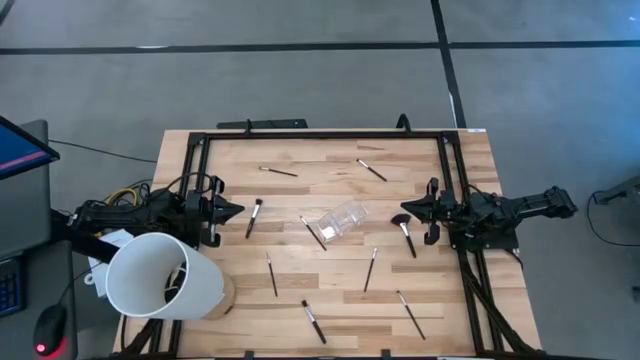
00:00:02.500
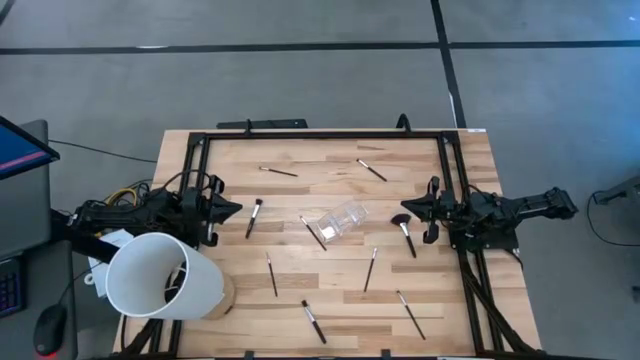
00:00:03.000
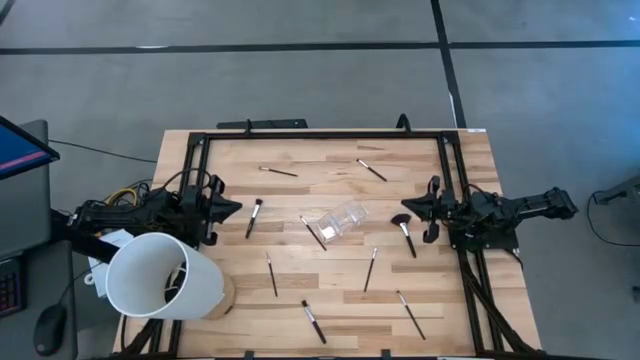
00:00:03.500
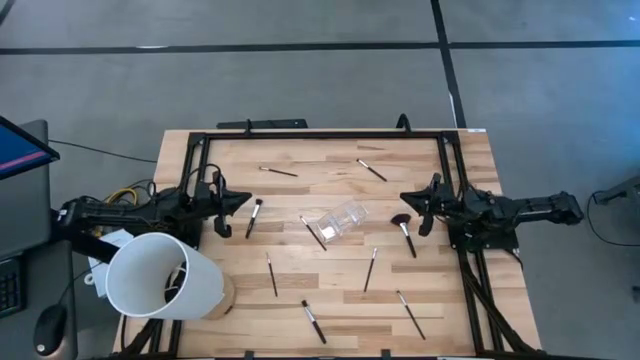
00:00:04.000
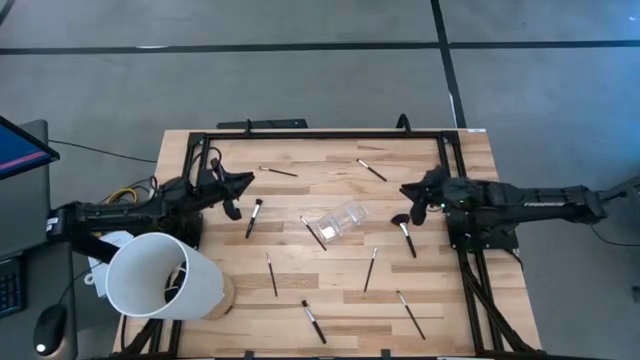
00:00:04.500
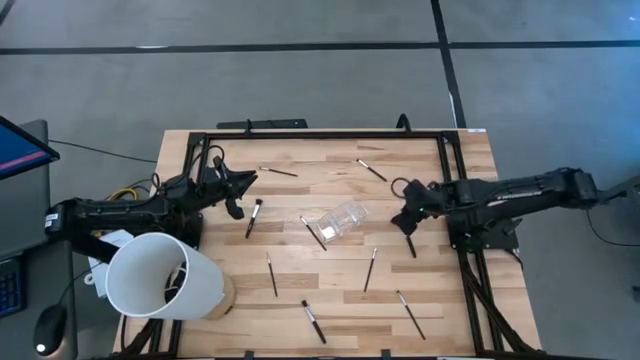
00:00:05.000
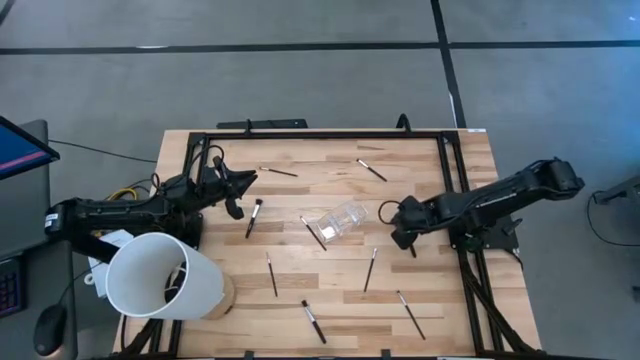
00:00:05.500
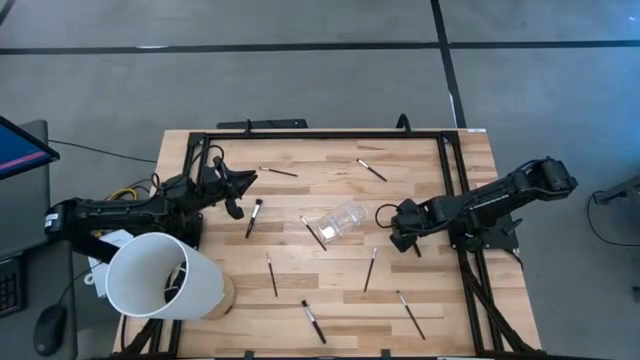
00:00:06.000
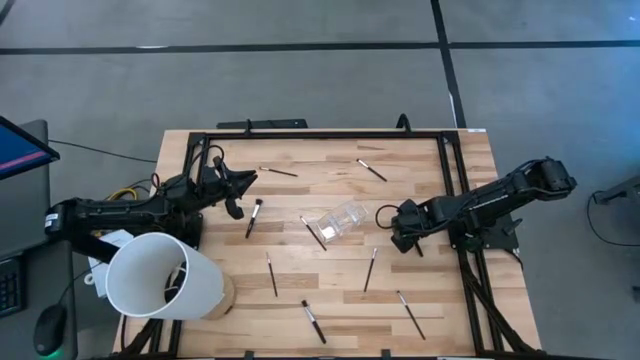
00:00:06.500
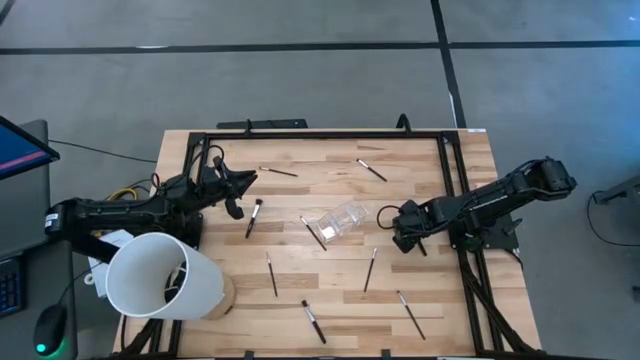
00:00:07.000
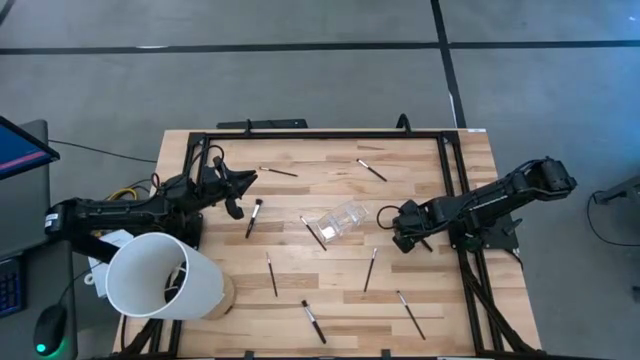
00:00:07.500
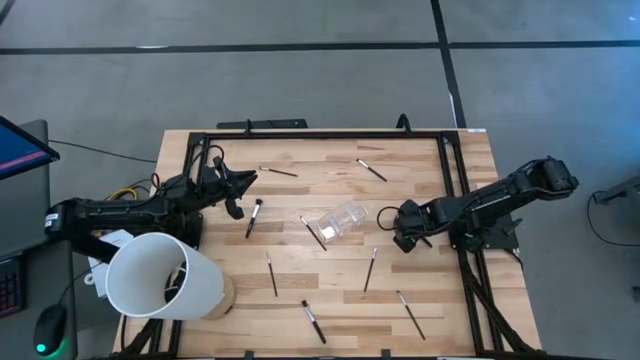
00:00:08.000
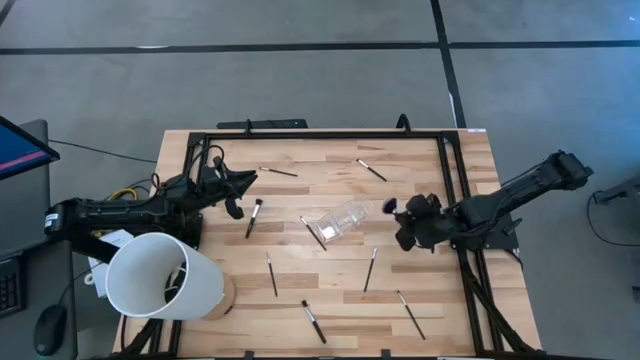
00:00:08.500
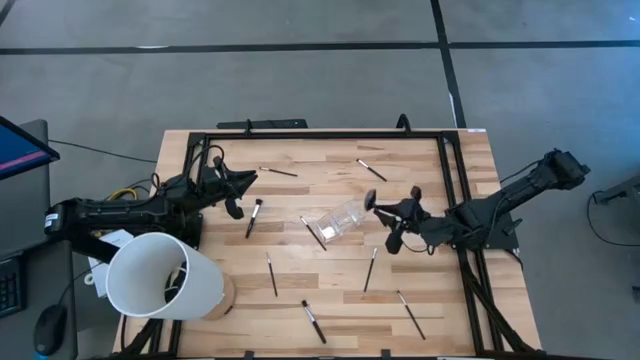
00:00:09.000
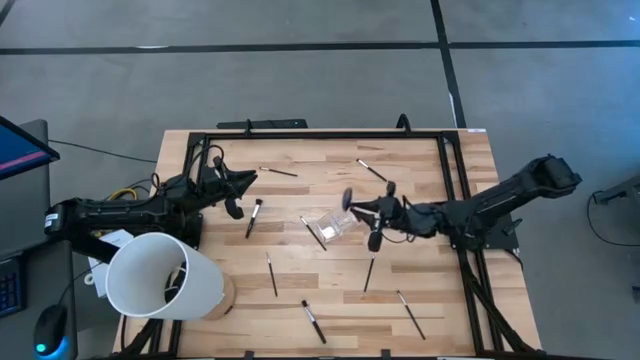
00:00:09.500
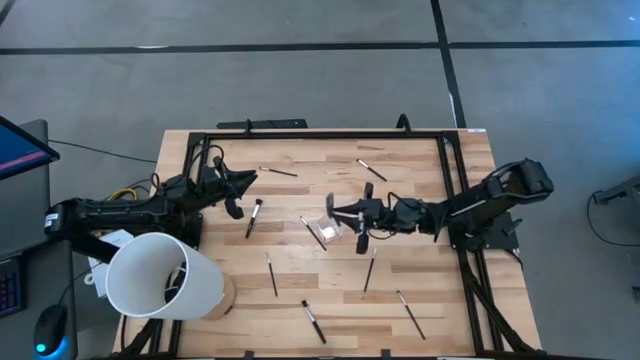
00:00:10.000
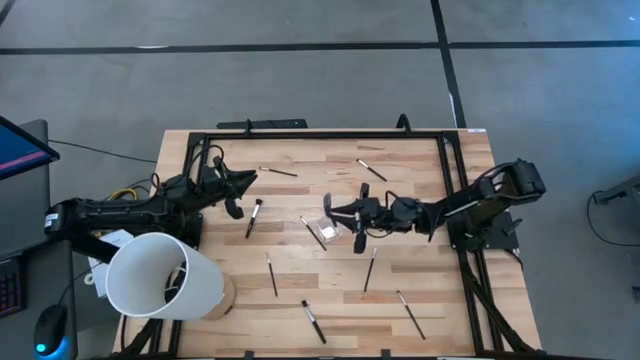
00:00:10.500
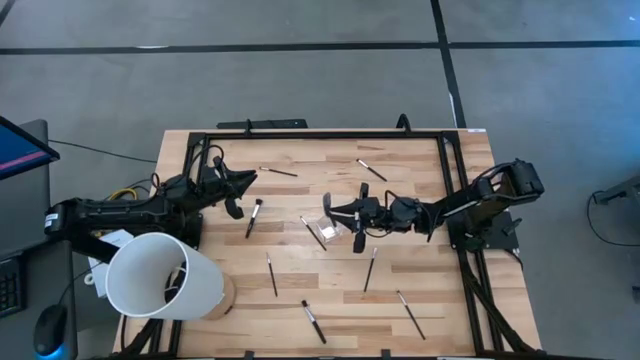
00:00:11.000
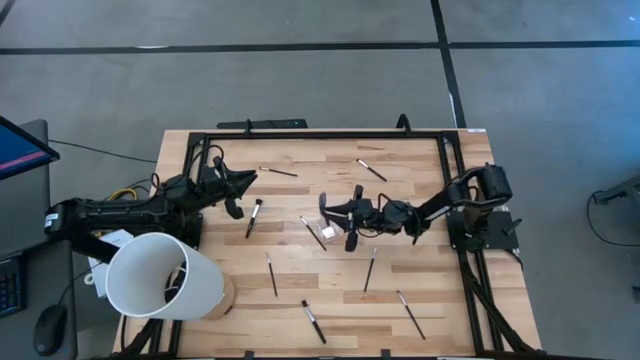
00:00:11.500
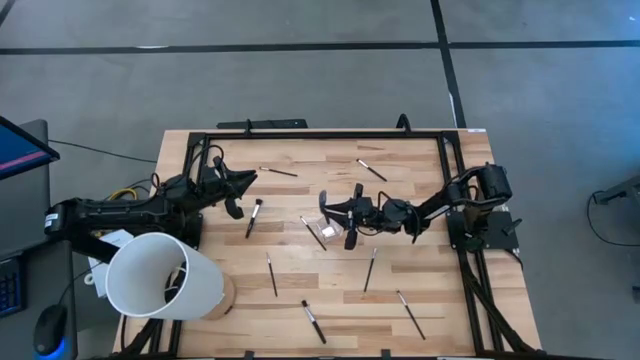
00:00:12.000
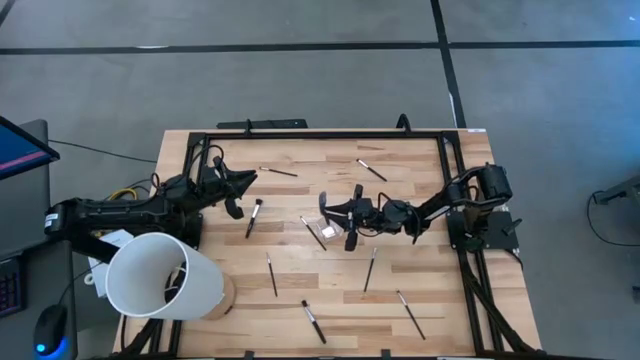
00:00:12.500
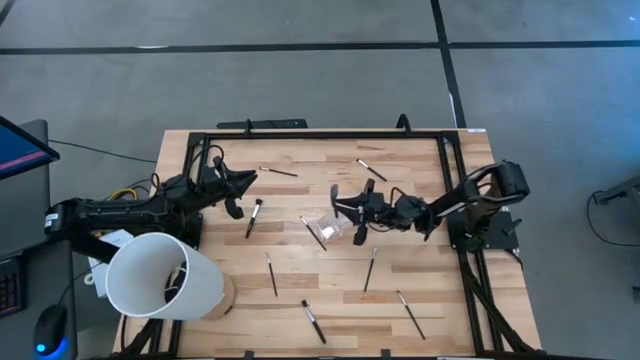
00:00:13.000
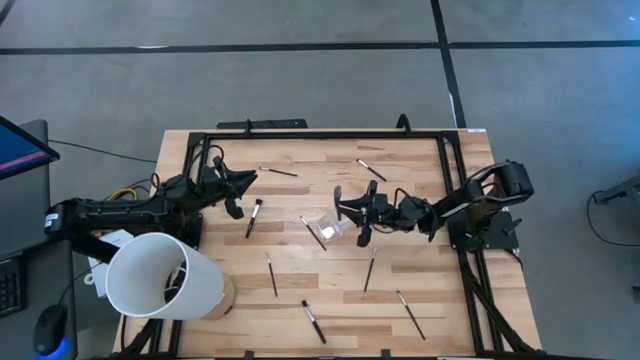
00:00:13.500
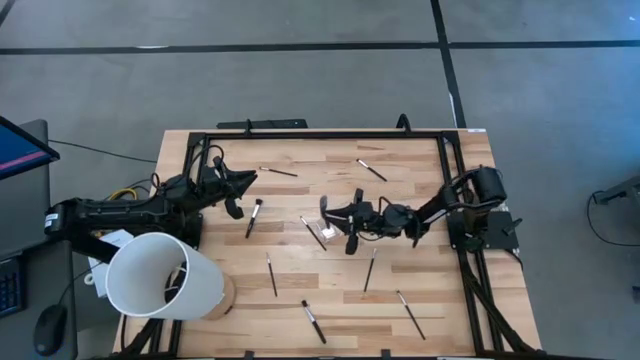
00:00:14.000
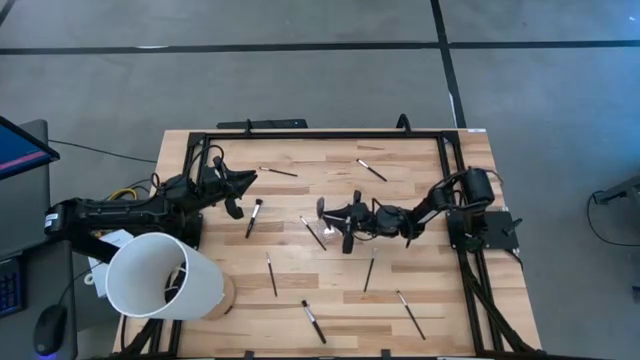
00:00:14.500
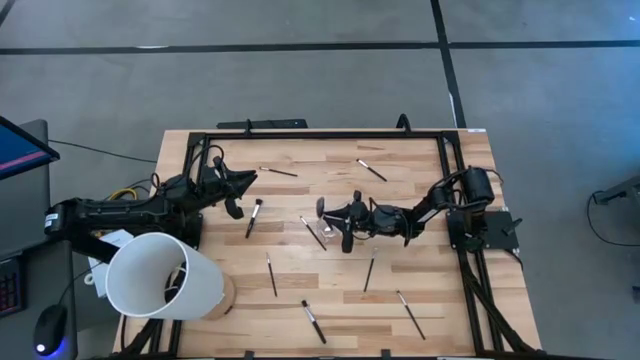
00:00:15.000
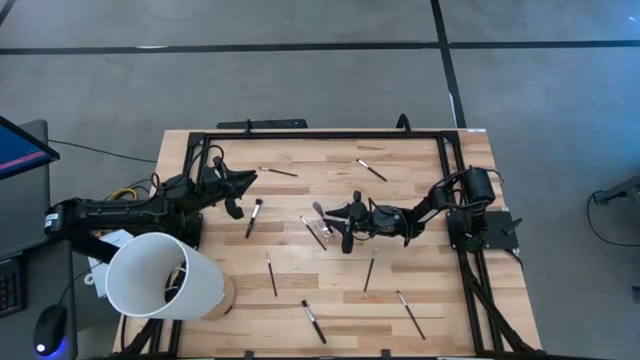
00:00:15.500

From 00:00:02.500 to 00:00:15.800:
Task: Put items in baskets/containers
Put the black highlighter brush into the transparent organizer

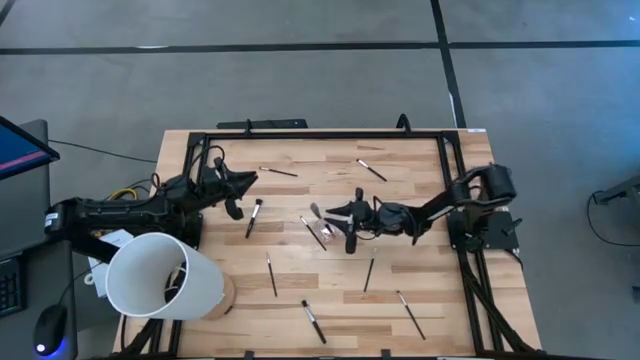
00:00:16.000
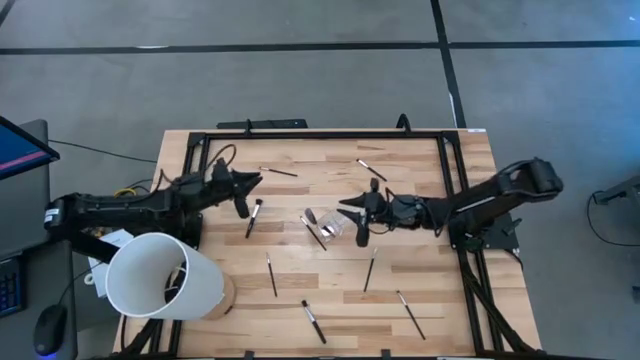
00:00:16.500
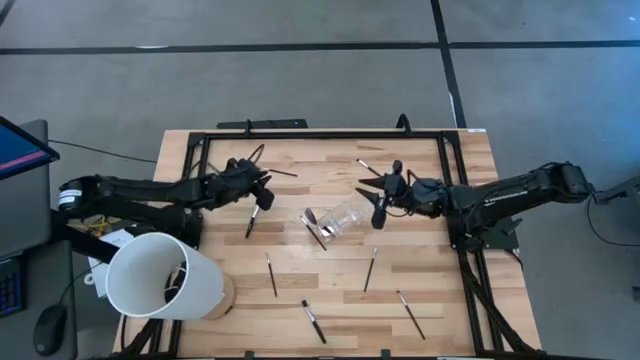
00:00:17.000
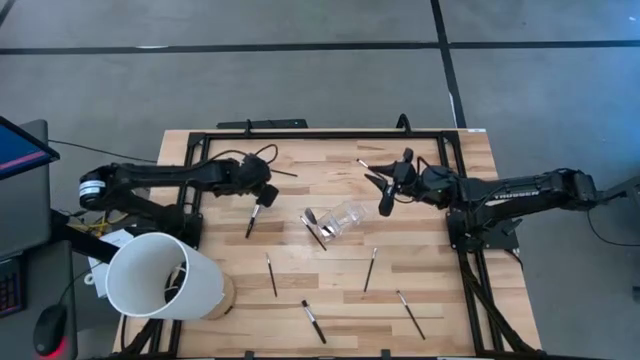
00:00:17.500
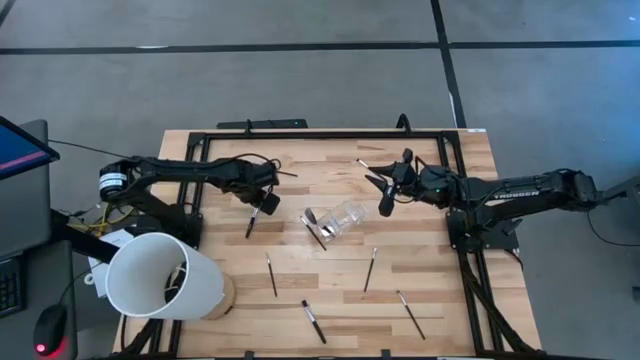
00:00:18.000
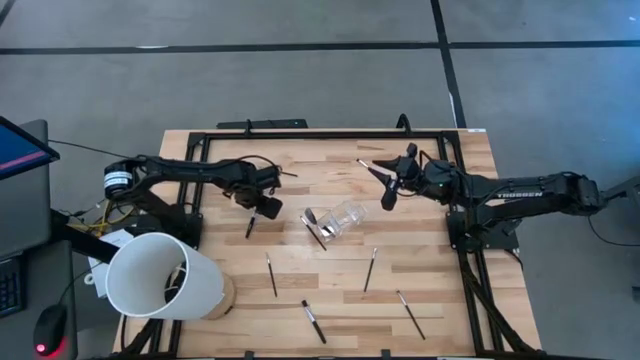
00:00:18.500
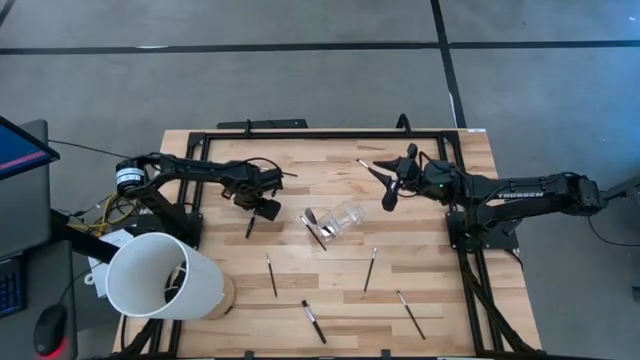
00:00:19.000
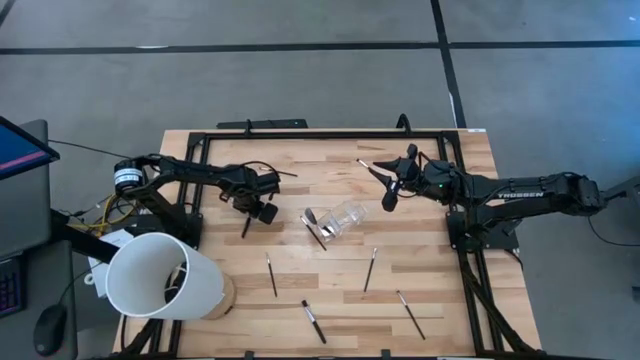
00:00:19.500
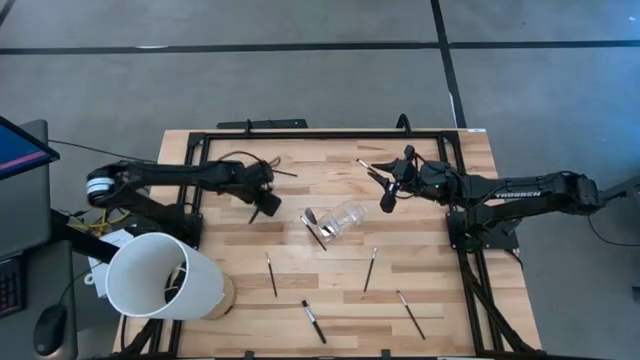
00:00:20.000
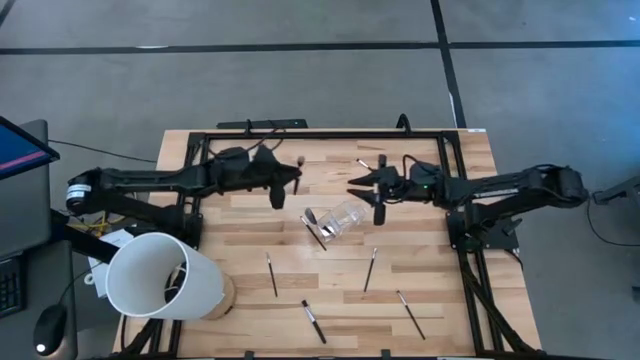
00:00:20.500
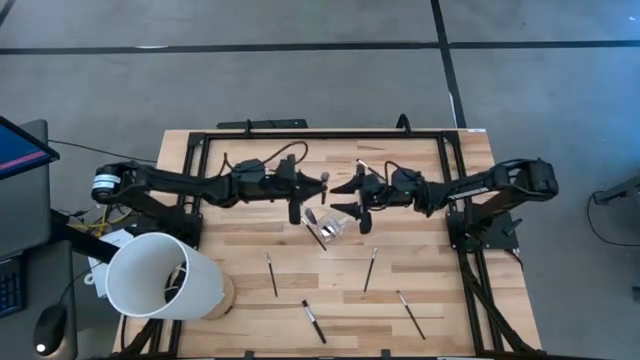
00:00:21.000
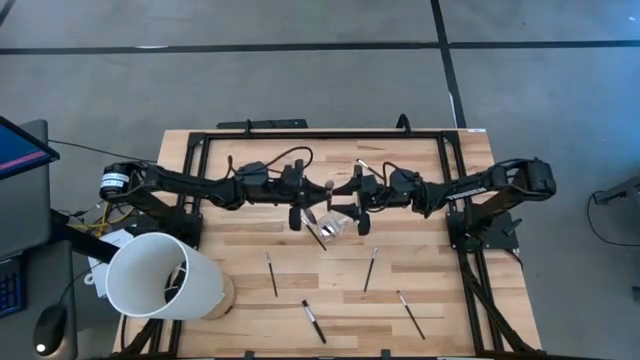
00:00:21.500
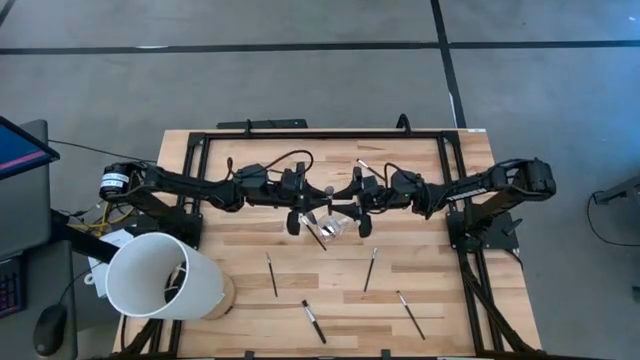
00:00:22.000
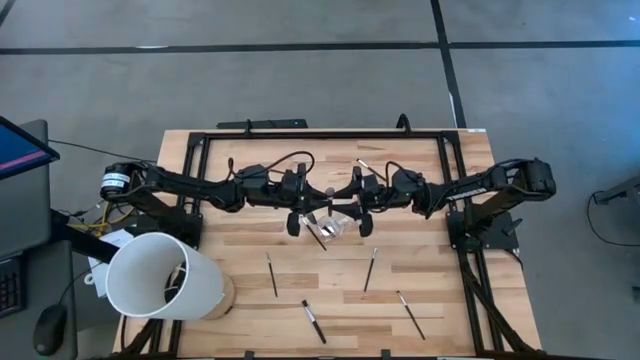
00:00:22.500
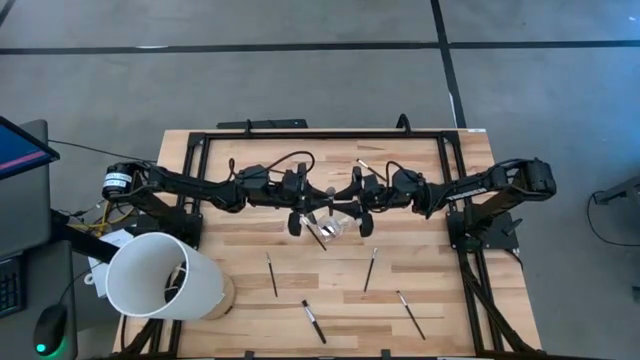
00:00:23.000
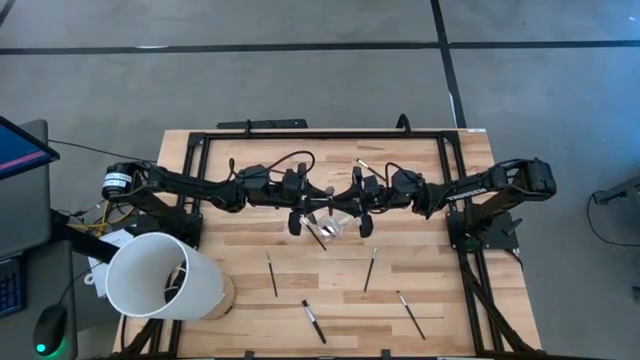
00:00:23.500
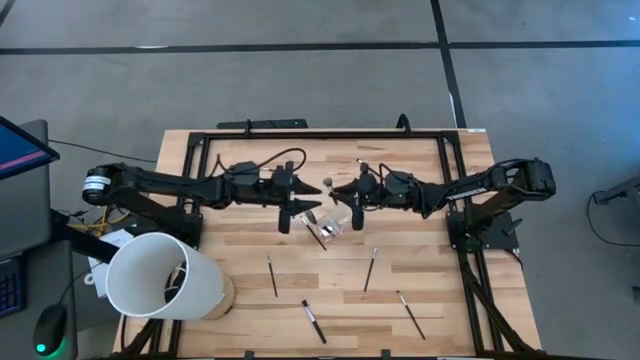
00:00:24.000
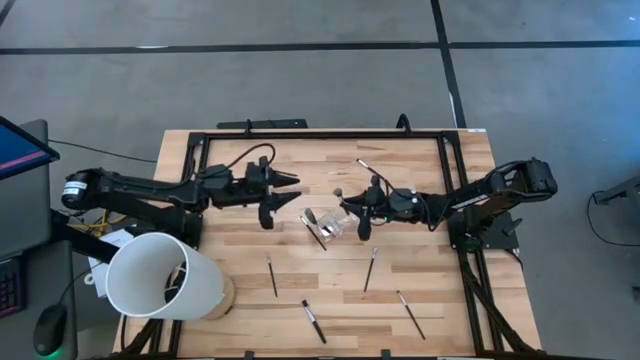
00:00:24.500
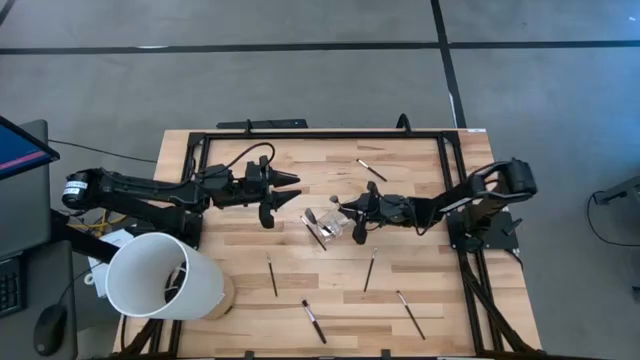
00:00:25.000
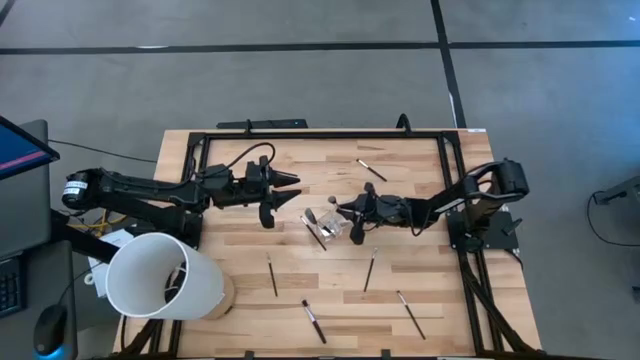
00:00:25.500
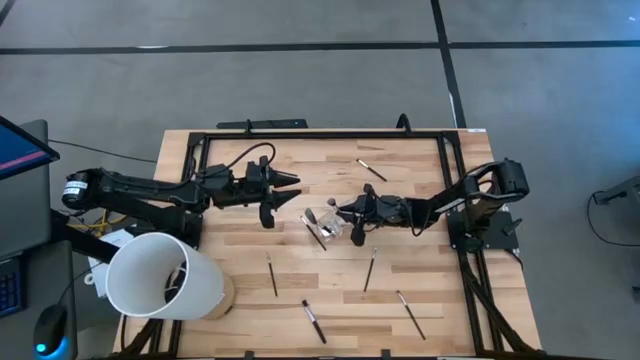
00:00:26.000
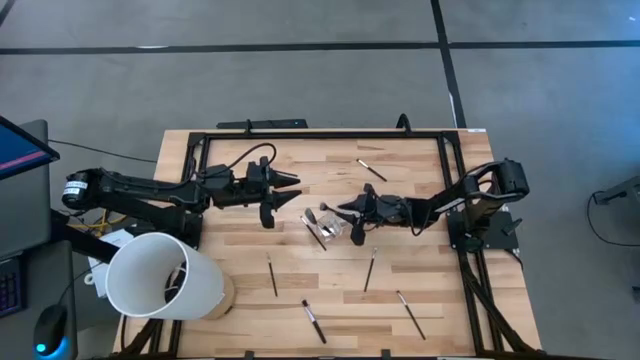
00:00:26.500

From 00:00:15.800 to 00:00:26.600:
Put the top black blush brush into the transparent organizer
